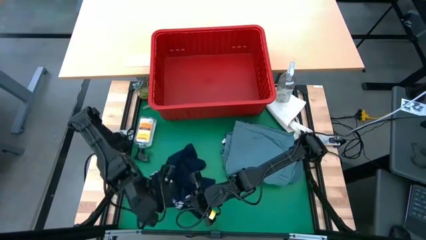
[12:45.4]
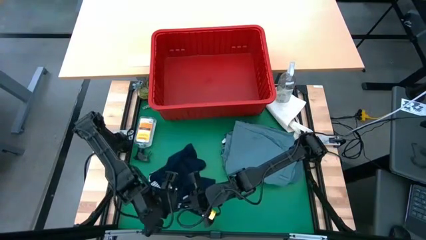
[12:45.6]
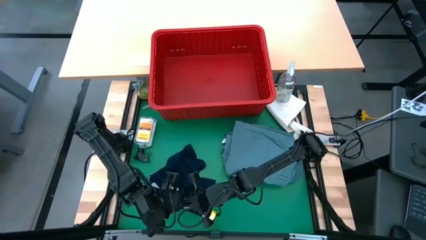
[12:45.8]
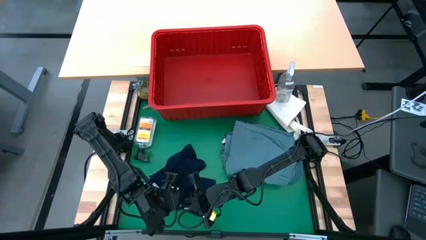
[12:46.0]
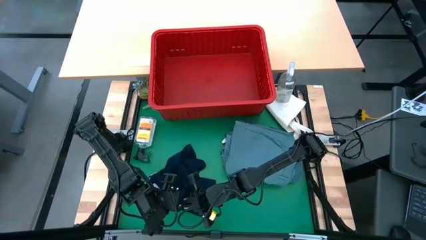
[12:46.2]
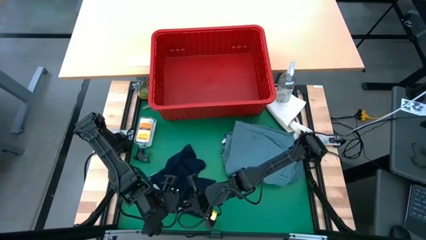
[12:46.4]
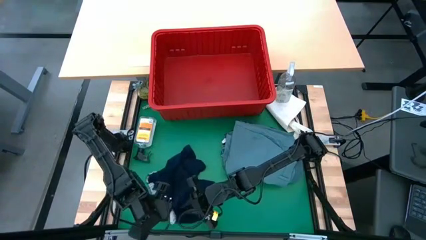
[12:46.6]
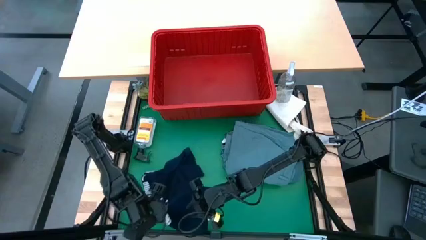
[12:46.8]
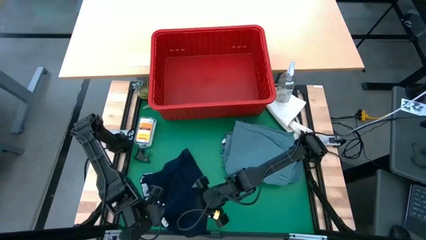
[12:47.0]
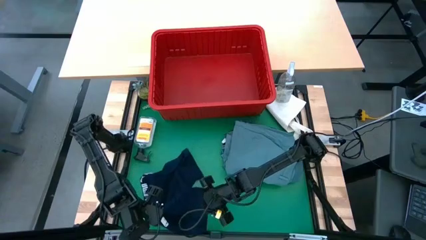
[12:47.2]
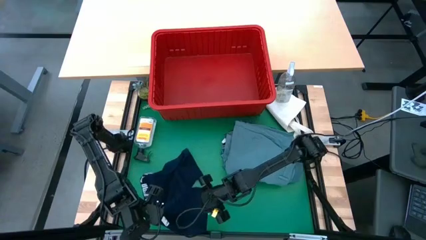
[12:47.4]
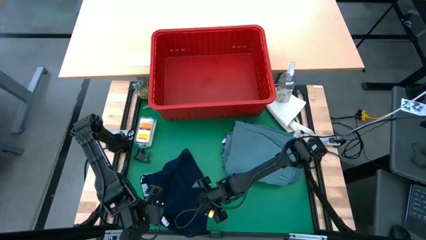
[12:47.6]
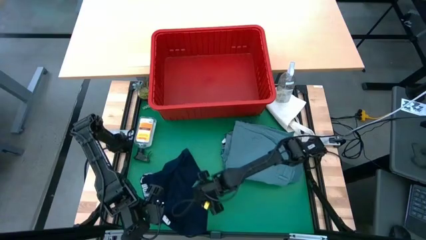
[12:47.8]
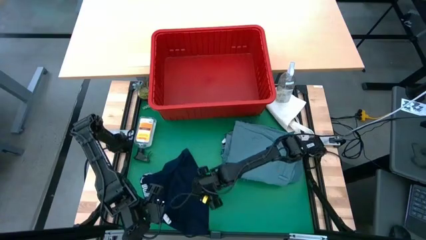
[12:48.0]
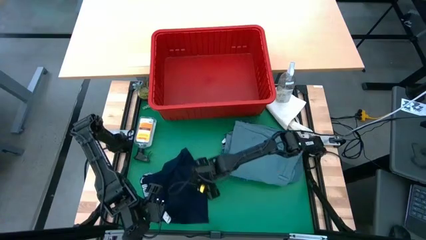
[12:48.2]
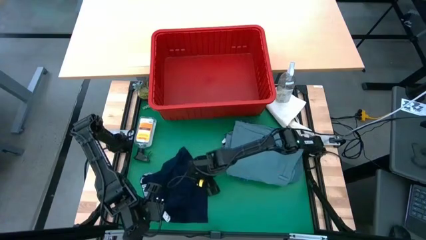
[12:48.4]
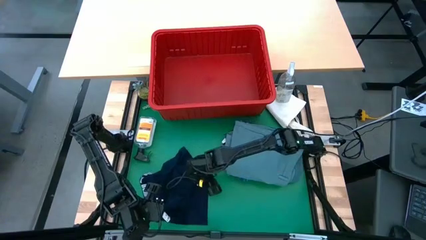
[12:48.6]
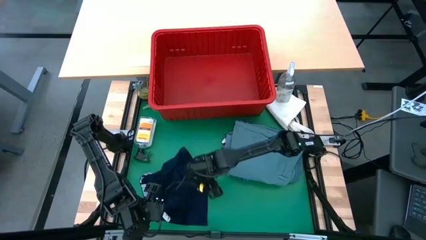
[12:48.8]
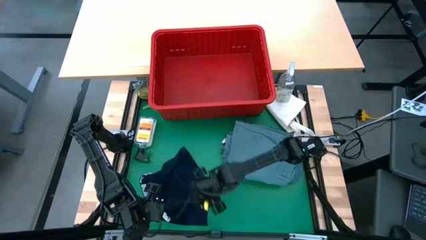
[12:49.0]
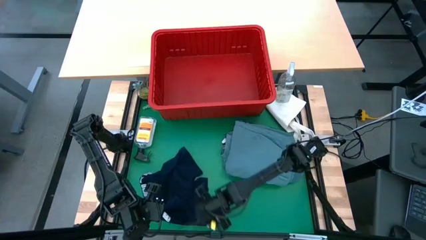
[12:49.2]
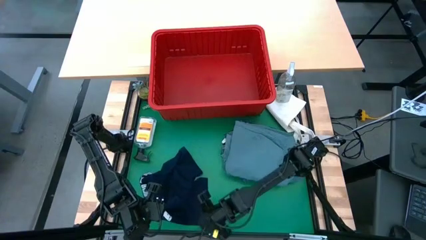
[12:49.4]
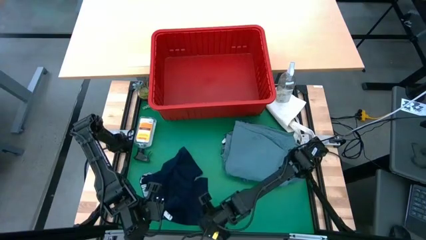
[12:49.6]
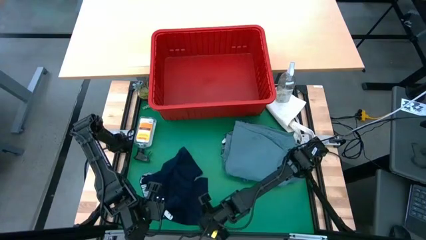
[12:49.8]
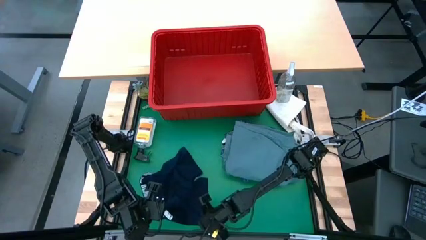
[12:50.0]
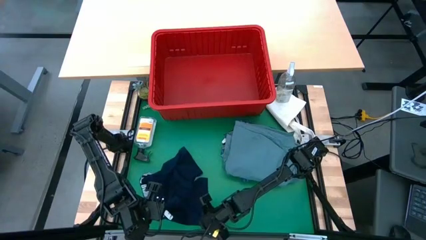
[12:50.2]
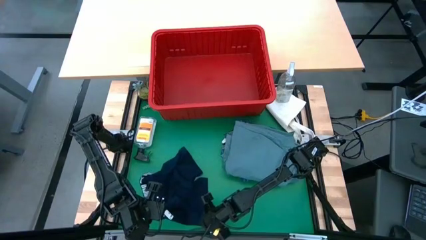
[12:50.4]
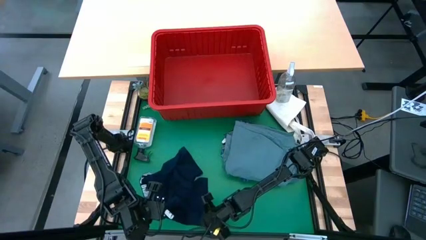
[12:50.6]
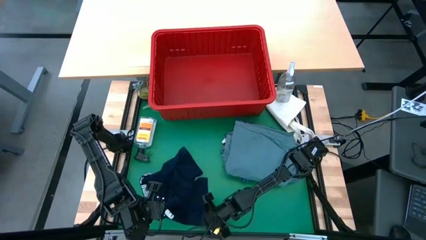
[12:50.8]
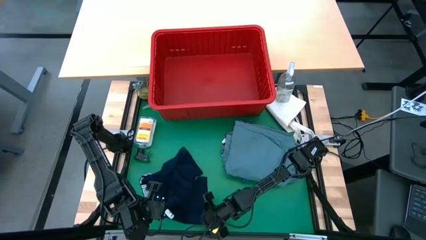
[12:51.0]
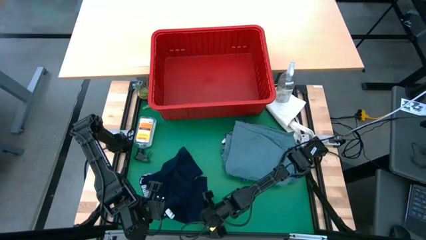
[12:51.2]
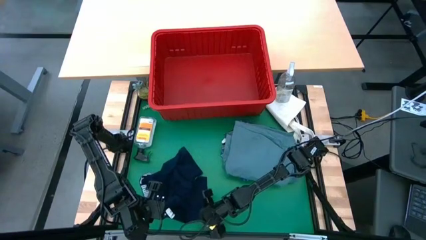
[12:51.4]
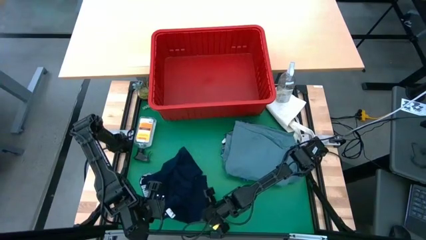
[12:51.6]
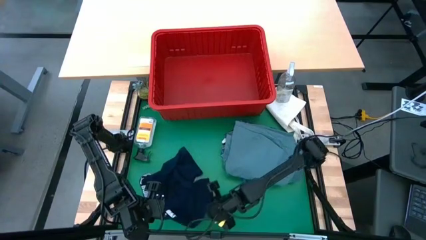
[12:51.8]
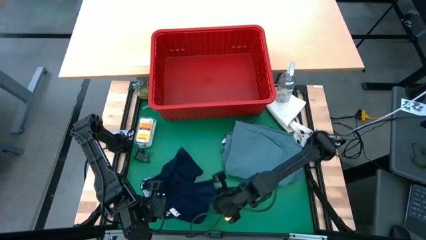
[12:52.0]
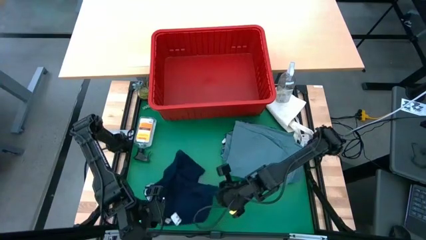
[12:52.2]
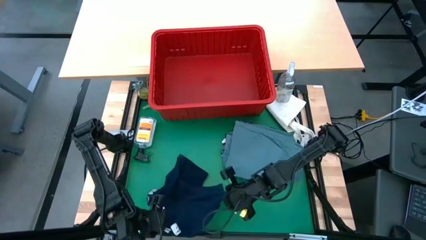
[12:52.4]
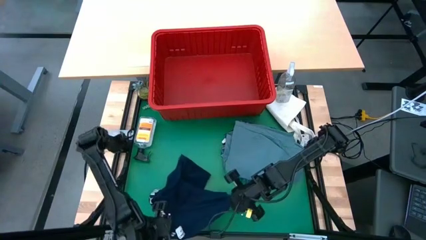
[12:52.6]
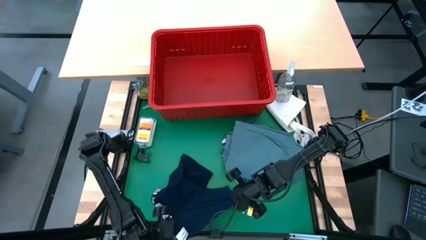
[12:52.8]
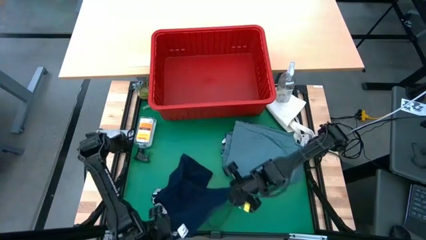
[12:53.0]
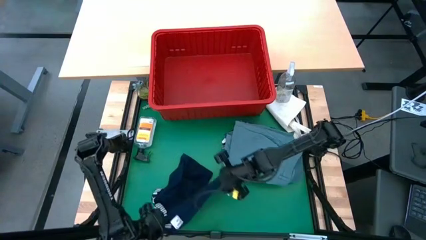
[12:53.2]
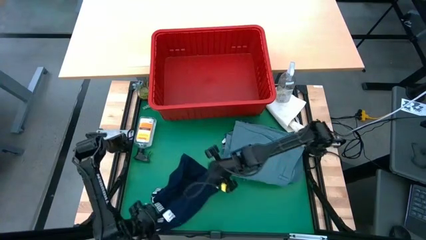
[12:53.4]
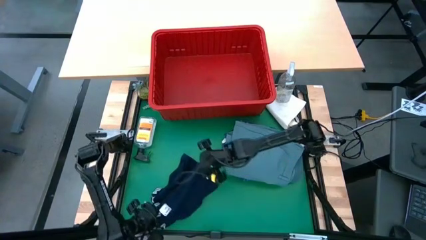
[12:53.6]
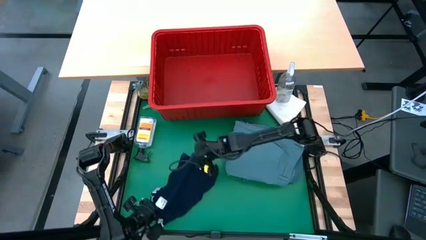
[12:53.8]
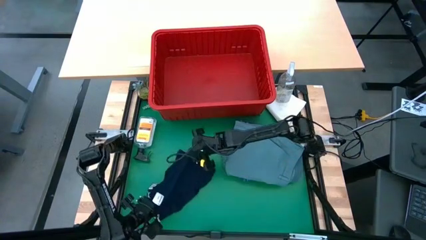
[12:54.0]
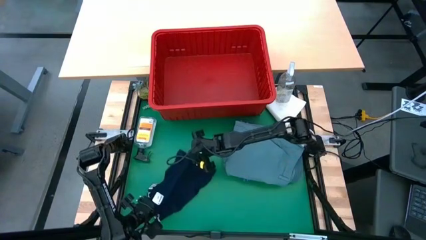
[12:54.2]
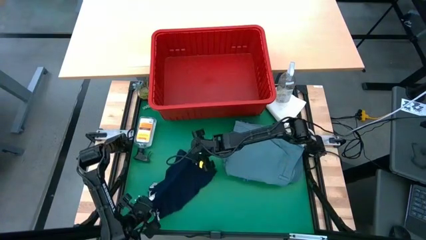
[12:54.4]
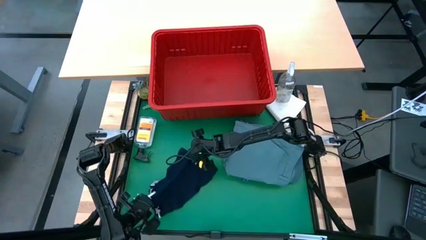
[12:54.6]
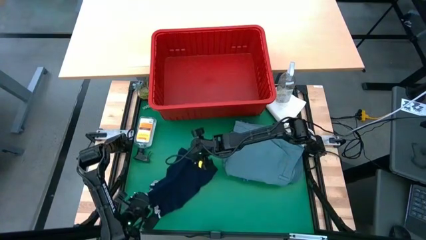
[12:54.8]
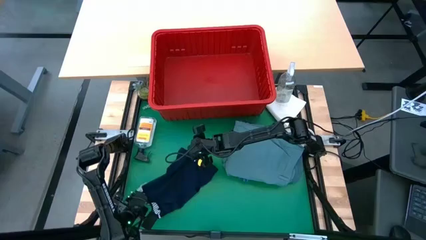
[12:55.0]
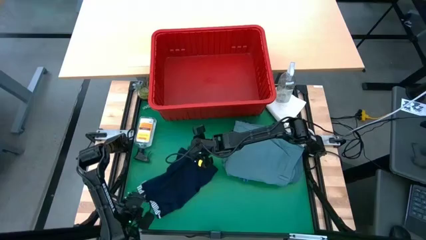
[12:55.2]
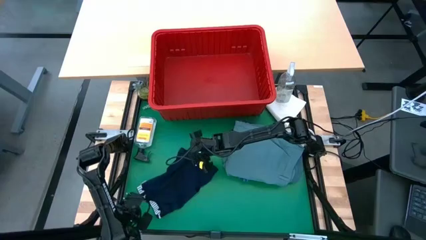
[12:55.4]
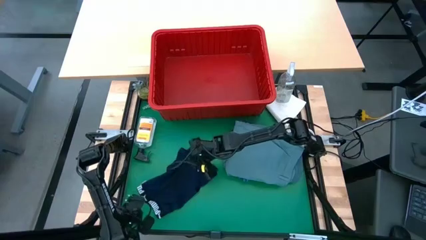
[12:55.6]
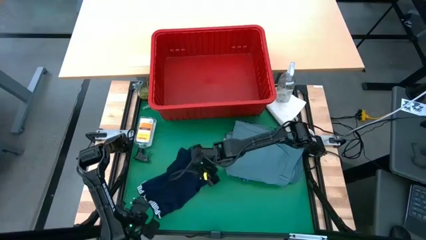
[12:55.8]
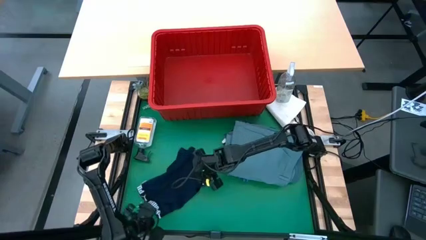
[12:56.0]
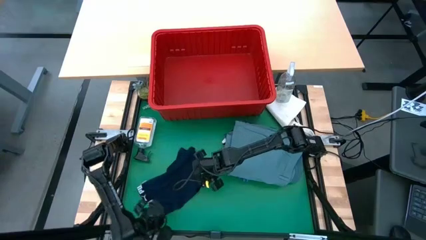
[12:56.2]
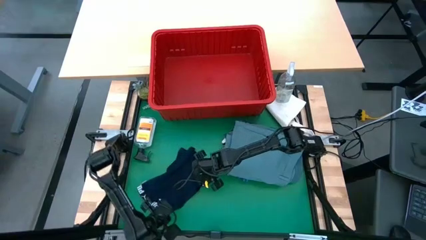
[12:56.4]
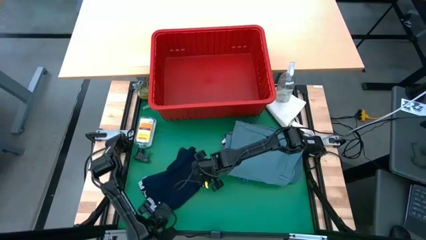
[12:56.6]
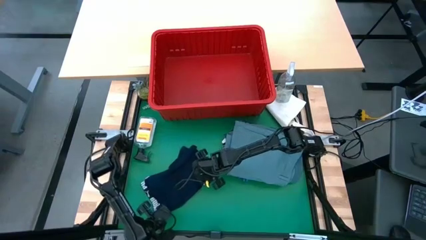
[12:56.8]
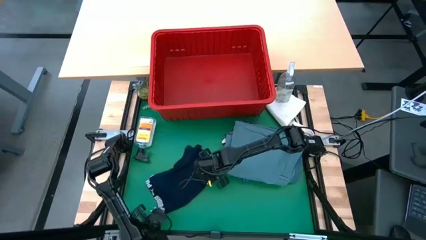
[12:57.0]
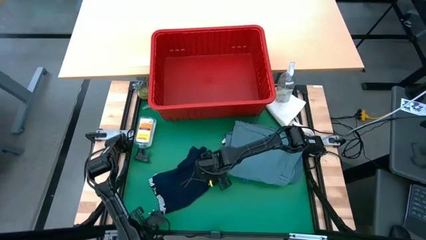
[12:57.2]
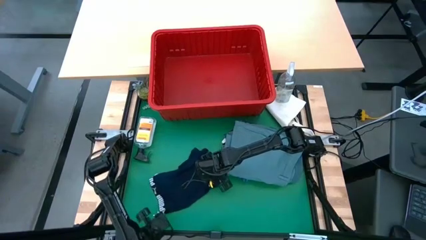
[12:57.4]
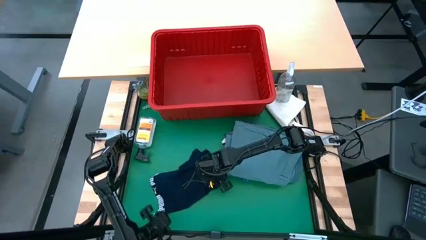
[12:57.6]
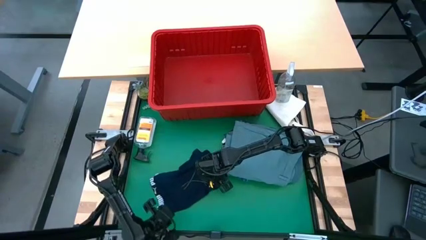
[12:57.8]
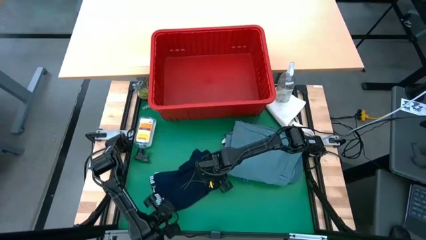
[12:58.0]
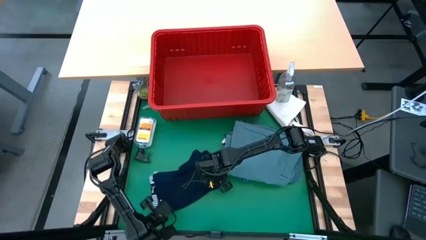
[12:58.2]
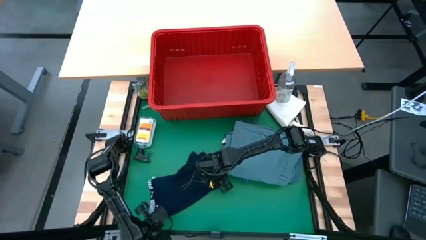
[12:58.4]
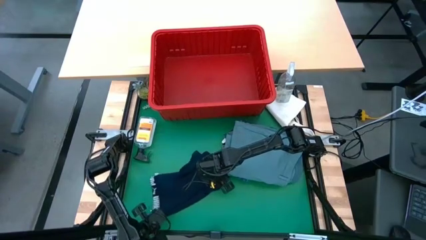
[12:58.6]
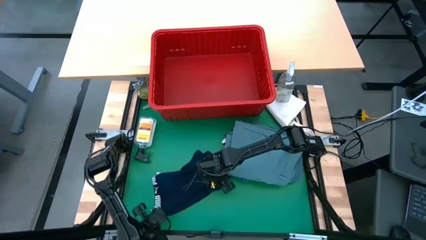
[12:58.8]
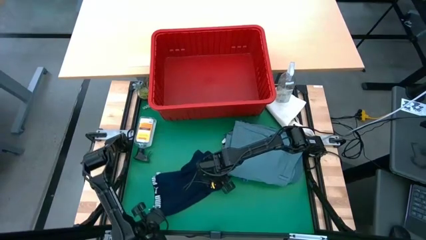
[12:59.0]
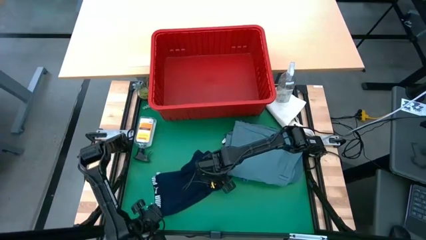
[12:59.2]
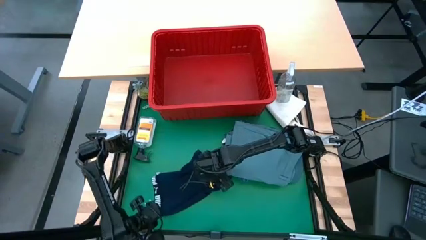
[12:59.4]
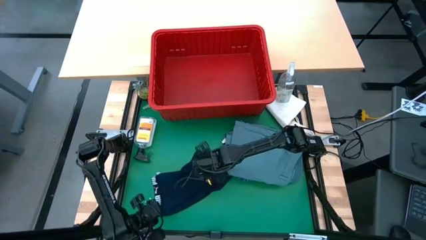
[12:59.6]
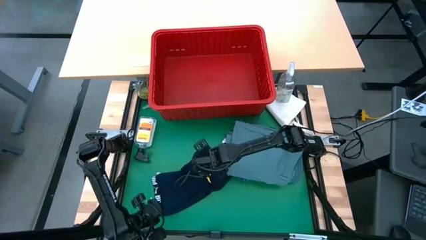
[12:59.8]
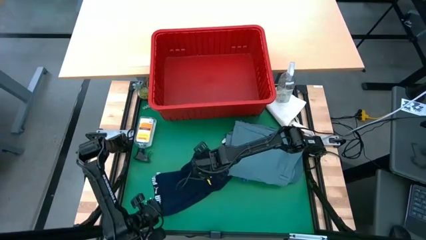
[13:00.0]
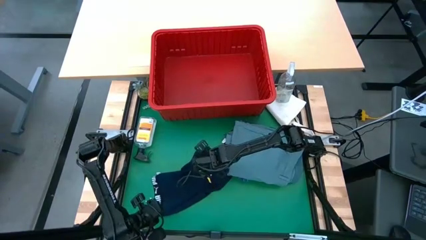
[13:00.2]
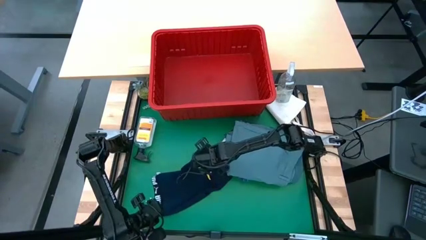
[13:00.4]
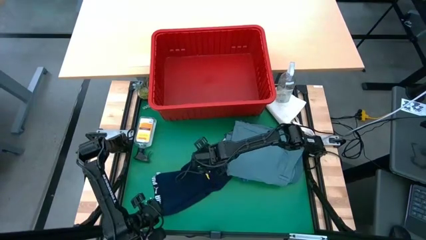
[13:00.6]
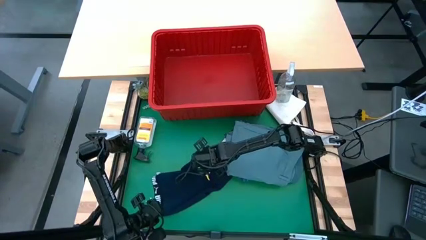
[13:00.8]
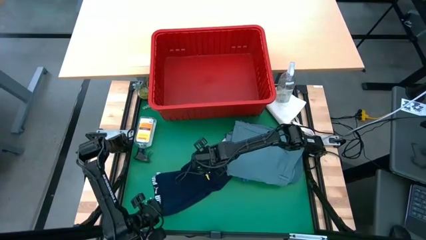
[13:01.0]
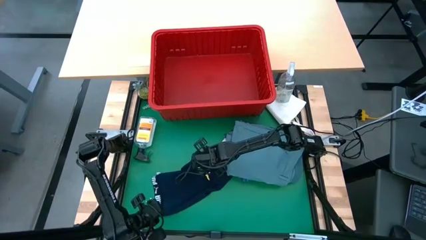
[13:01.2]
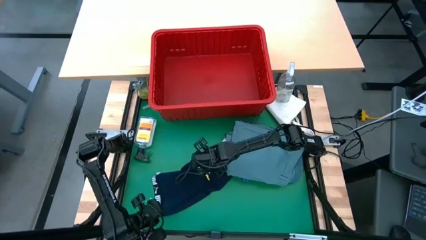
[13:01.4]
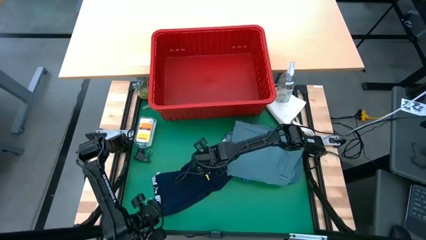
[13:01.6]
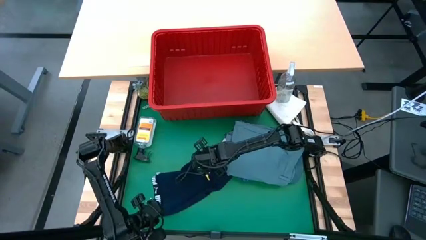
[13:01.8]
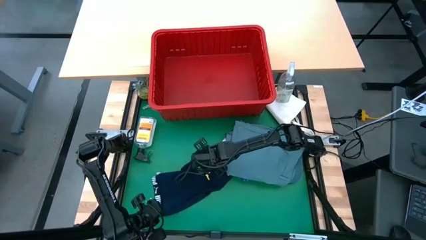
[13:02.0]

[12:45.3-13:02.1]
Task: Fold Laundry from Bin
Fold the dark blue underwear shorts
